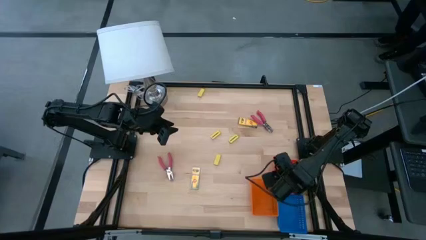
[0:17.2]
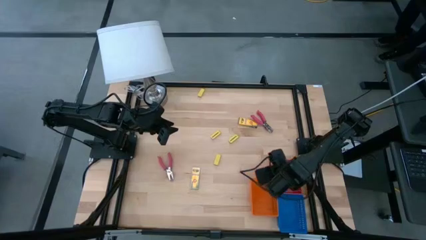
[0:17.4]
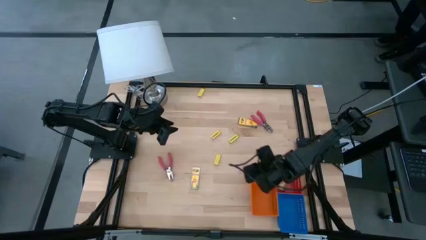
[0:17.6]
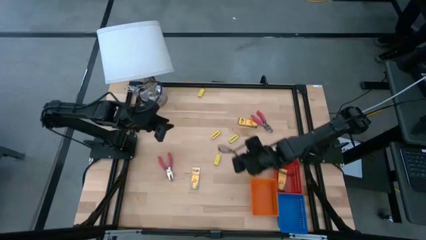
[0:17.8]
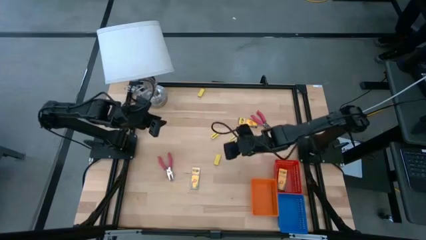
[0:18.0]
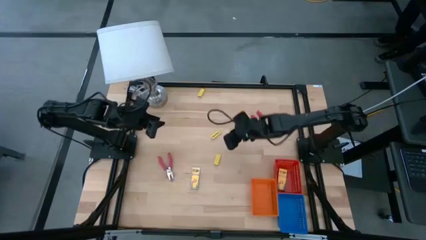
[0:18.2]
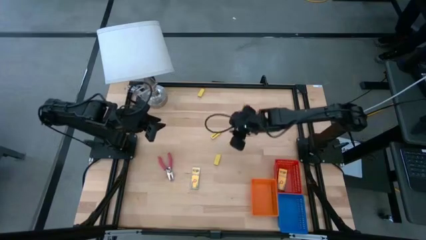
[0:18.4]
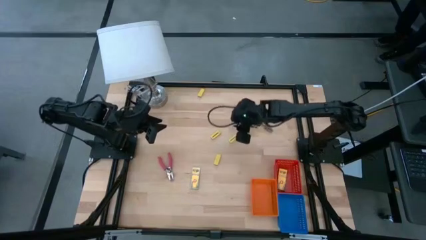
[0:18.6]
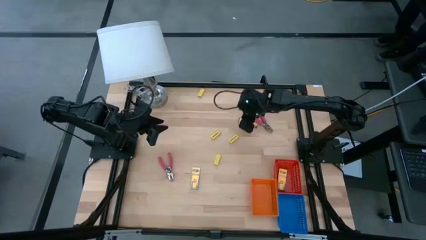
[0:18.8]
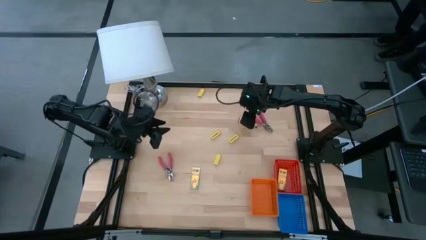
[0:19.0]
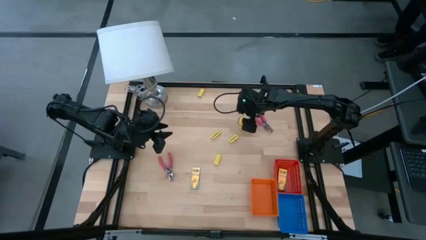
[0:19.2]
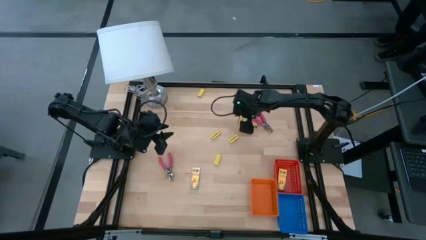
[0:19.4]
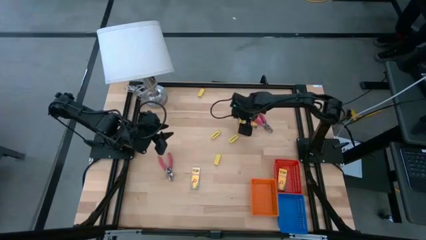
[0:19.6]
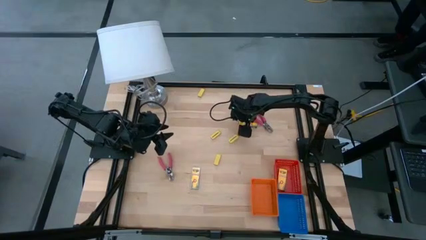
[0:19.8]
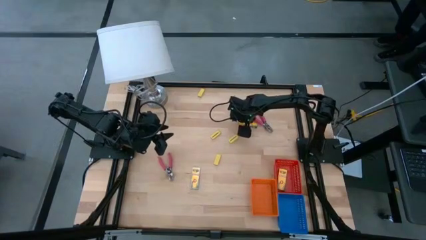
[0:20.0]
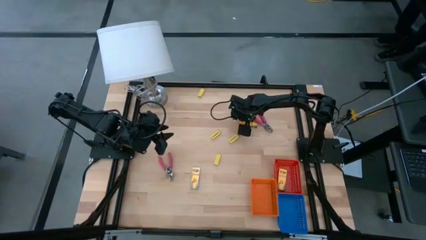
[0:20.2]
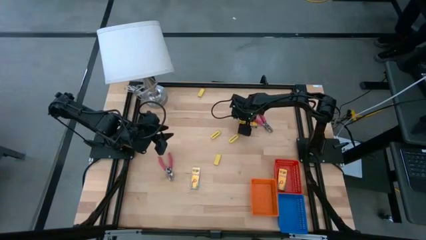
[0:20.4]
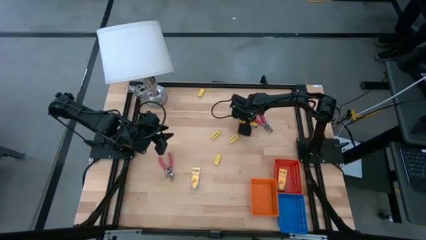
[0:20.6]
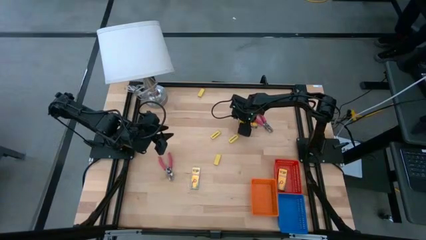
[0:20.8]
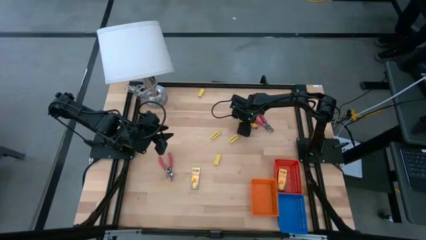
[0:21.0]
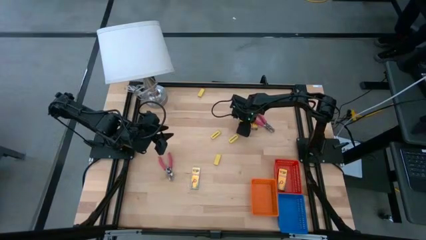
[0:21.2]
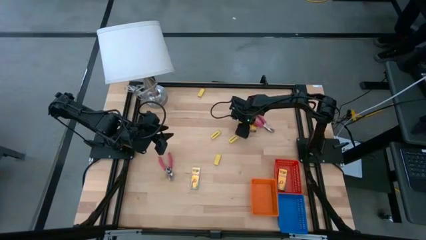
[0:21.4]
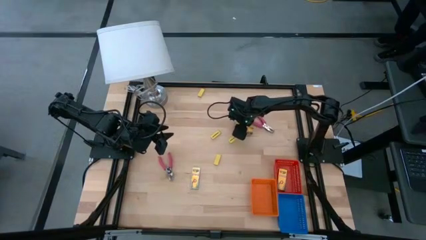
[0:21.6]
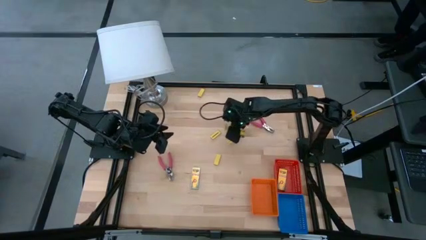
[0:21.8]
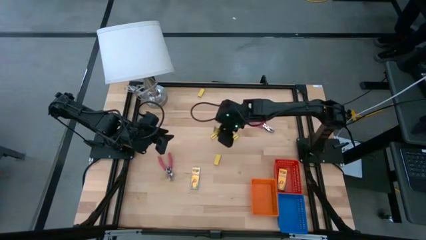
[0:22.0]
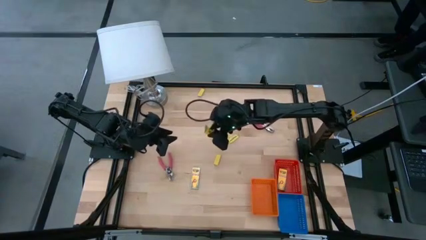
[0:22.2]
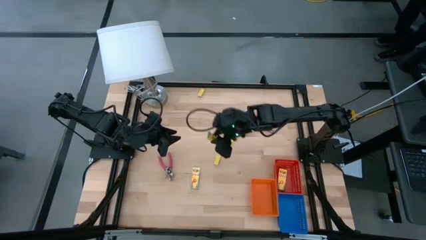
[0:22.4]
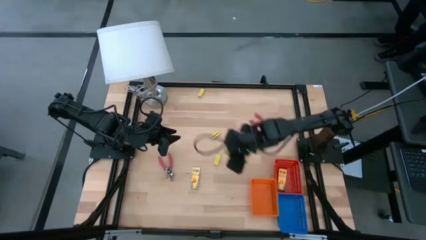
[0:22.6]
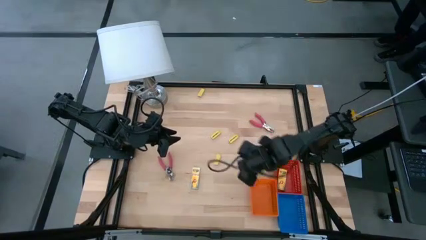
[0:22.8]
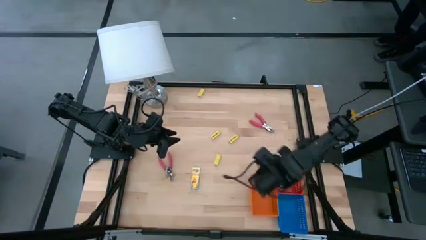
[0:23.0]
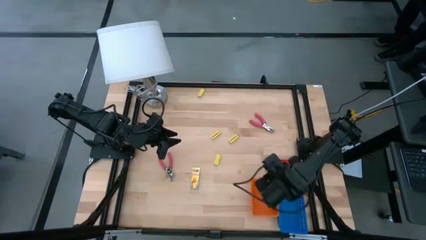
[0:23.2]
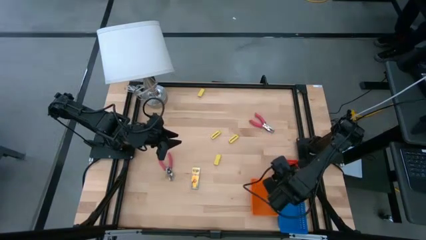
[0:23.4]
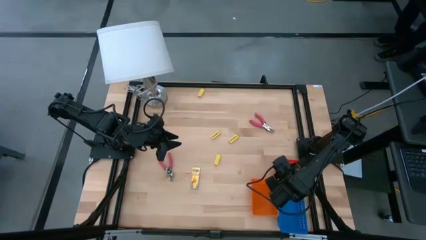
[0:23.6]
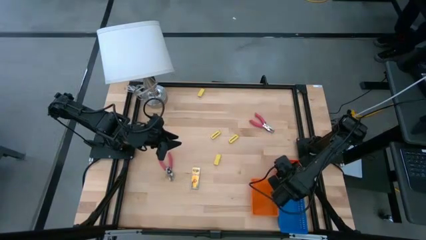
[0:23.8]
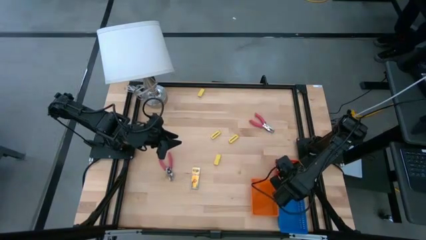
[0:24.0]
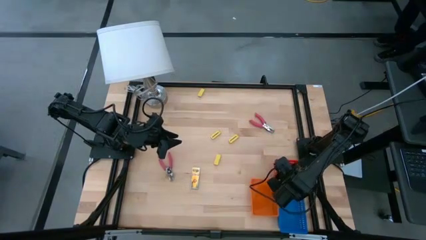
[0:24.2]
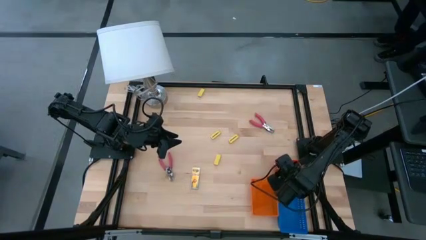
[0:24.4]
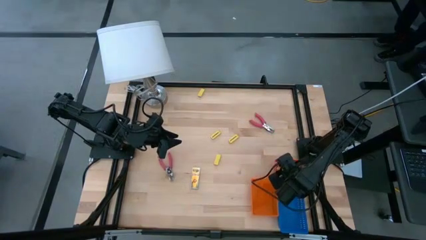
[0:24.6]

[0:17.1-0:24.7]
Task: Pick & Place School Supplies
Put the yellow crayon box into the red basket

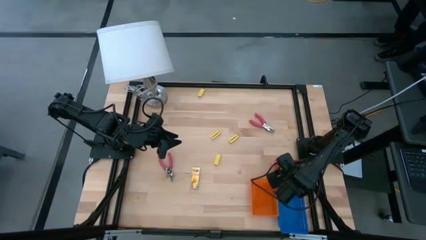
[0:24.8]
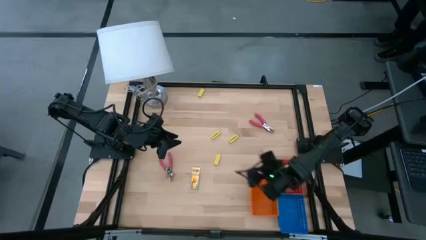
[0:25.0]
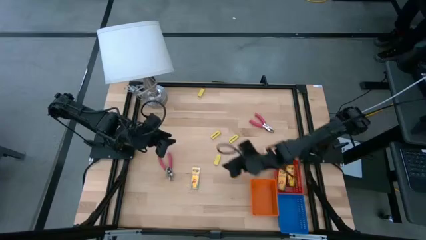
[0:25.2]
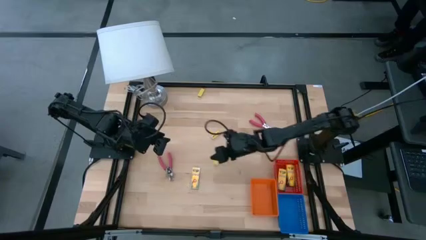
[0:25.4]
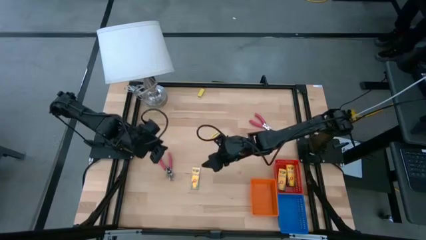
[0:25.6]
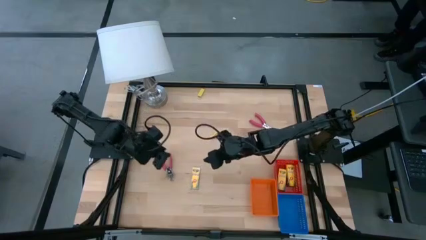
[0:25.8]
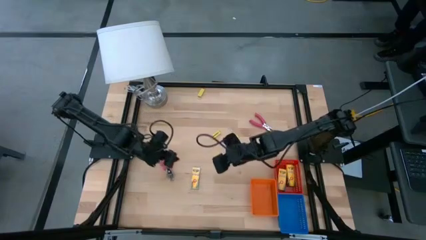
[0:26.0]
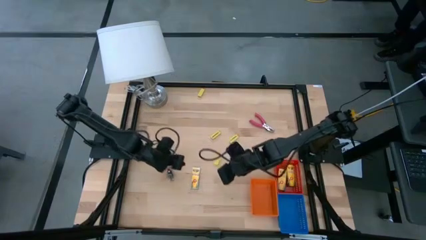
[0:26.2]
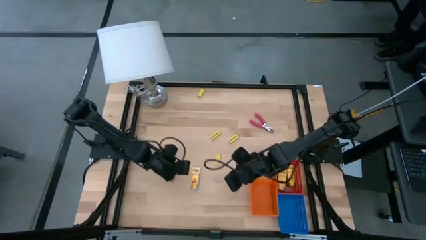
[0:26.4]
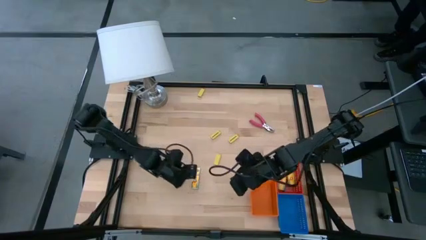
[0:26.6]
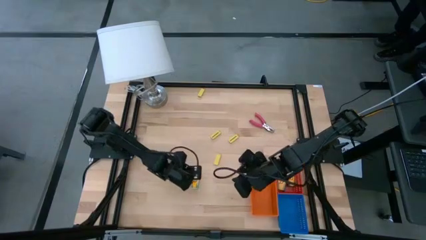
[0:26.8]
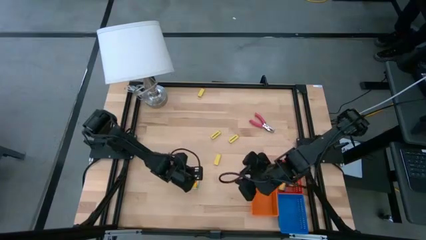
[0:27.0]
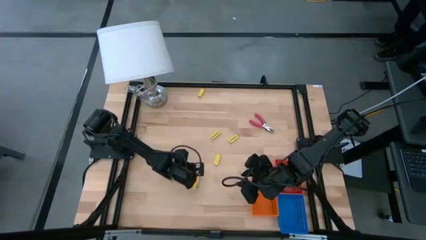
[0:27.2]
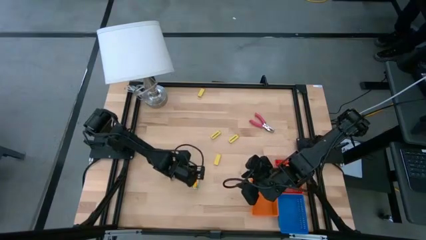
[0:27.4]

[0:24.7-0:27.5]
Put the yellow crayon box into the red basket

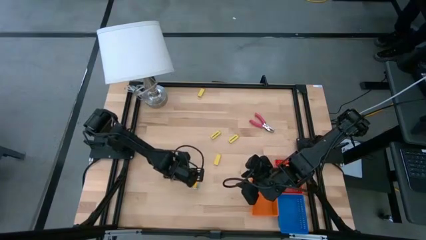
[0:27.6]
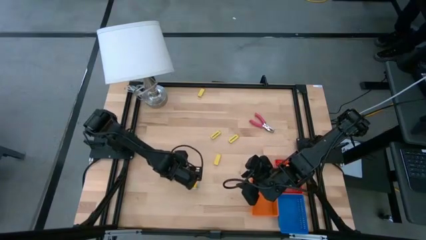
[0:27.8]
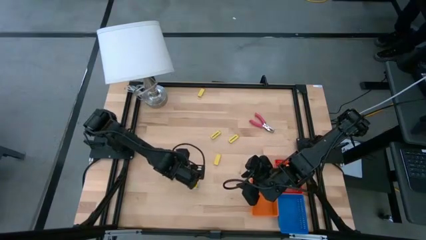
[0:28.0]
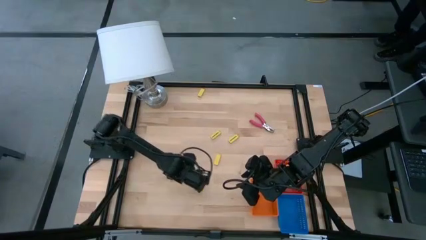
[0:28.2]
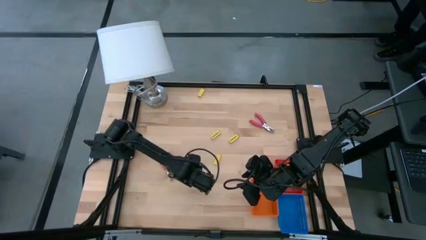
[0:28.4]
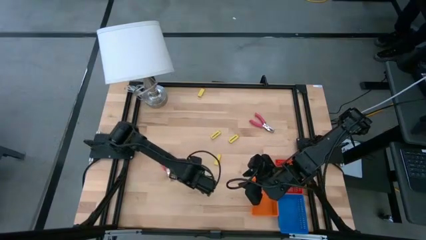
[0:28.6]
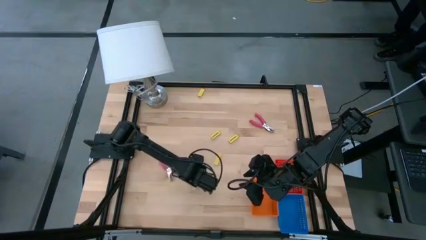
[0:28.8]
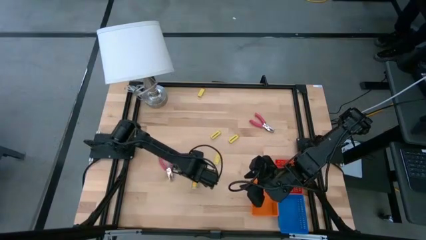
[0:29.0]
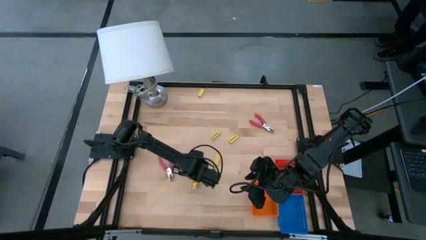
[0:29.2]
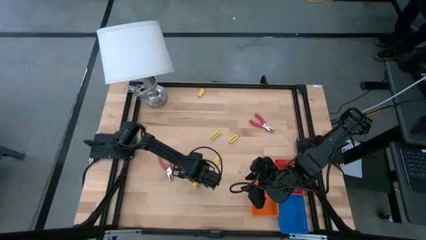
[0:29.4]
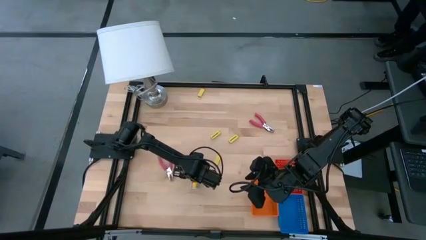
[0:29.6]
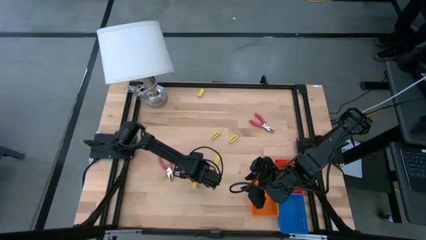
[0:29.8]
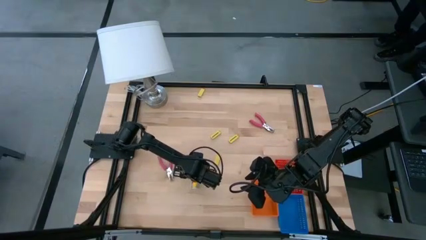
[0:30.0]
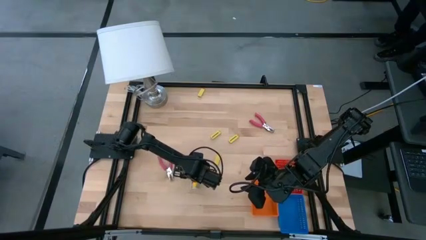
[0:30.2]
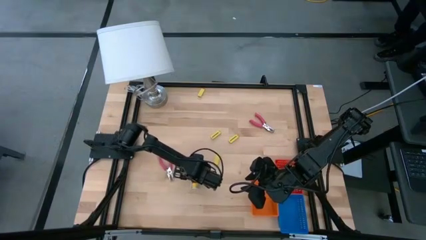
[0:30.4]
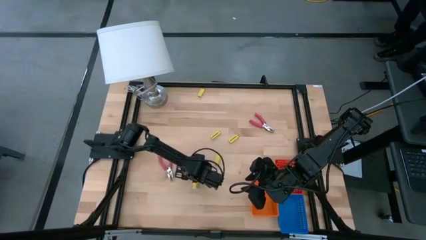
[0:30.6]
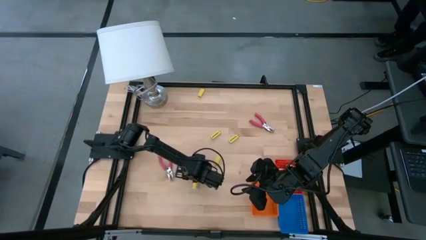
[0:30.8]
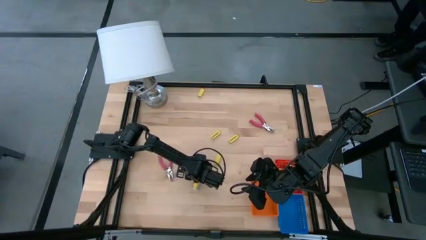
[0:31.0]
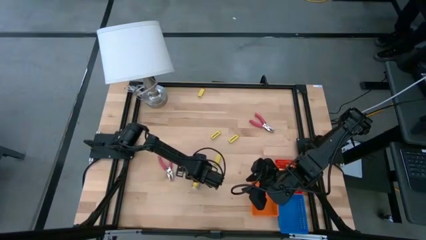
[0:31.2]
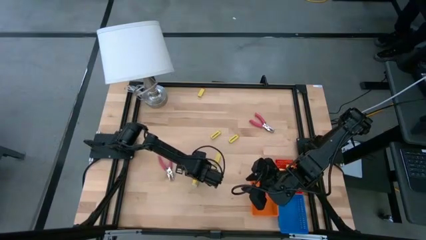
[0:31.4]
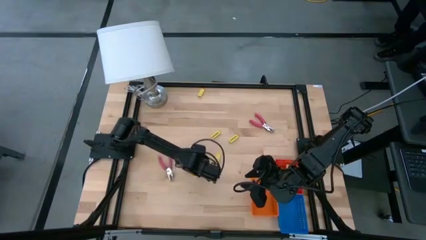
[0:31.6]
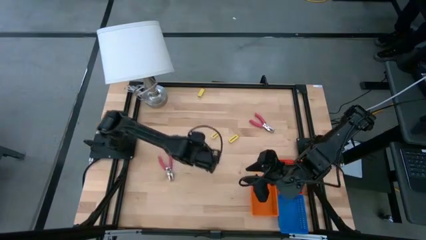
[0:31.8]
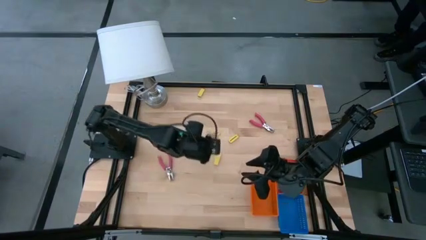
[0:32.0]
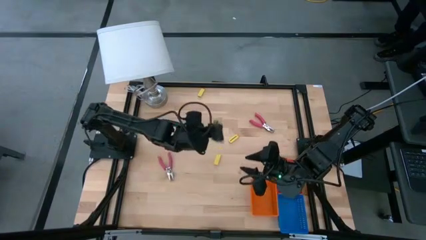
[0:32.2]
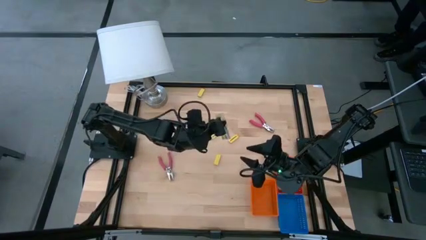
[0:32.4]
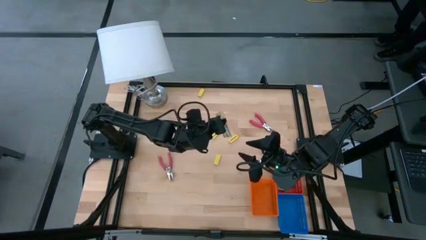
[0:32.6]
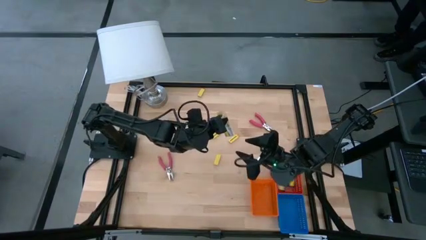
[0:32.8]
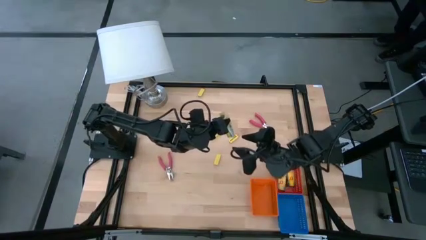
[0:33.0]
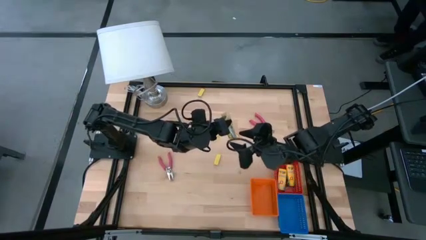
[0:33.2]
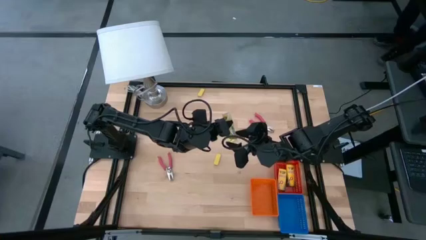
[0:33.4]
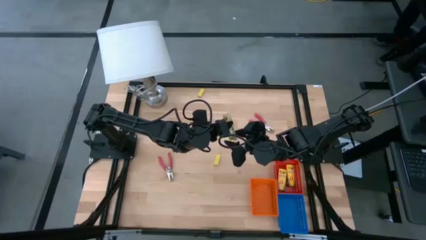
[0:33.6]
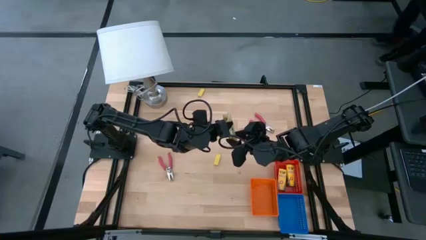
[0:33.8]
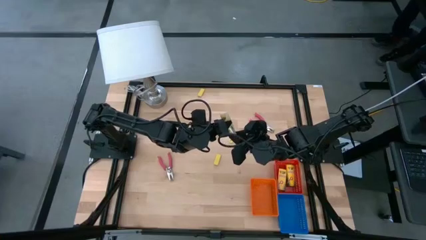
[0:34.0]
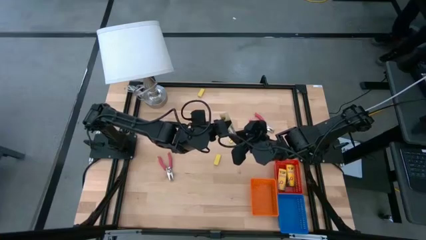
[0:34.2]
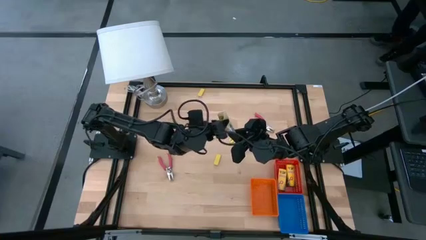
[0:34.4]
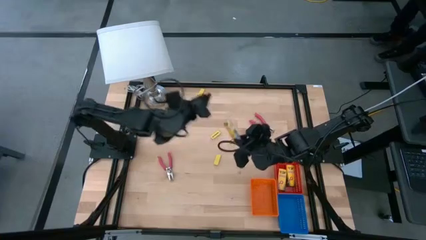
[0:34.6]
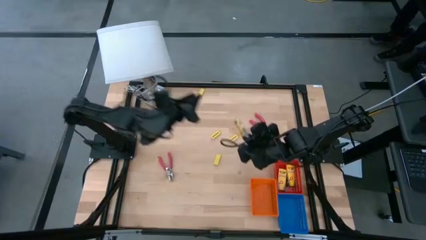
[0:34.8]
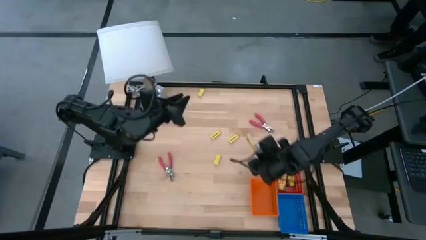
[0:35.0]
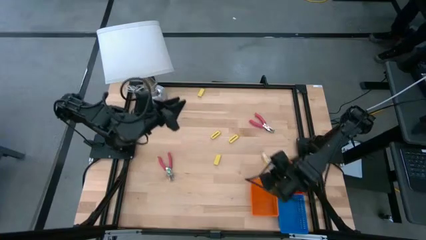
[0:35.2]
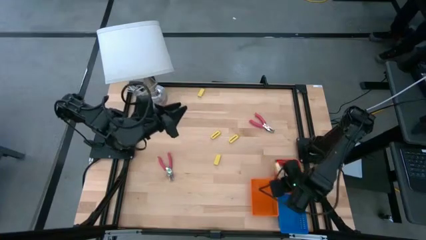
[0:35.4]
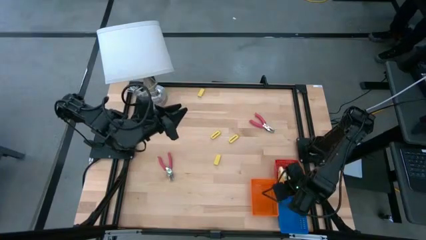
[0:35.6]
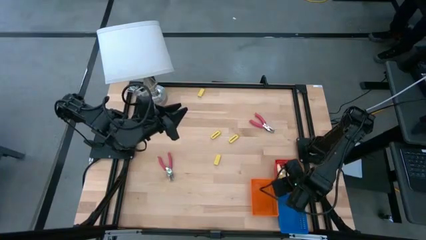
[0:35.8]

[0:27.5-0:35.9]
Put the yellow crayon box into the red basket
